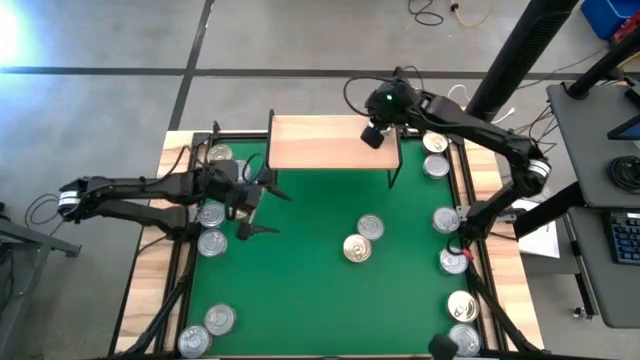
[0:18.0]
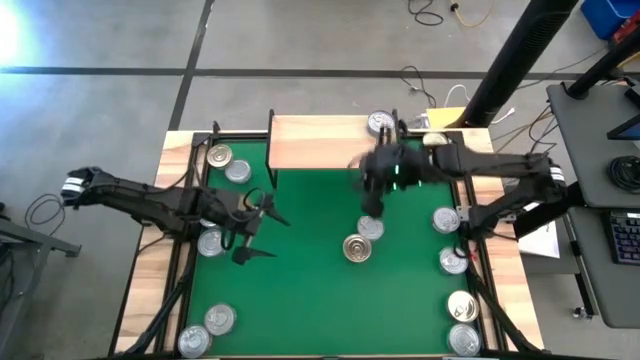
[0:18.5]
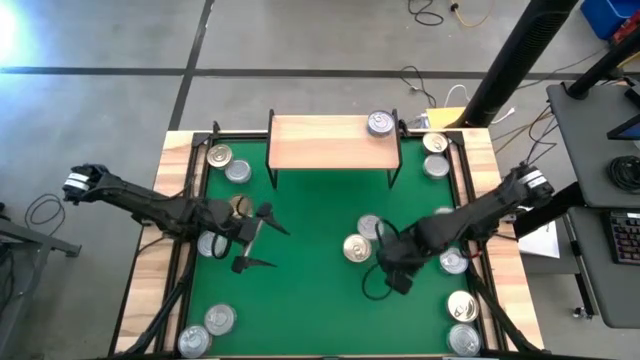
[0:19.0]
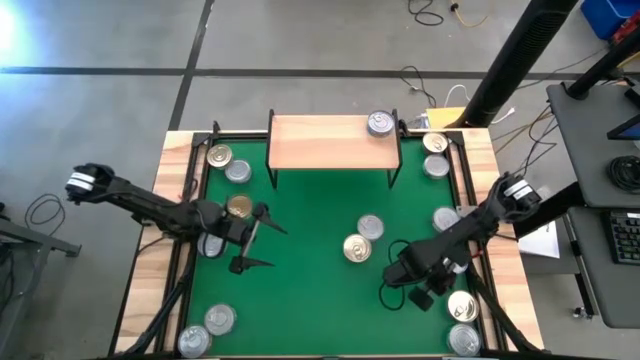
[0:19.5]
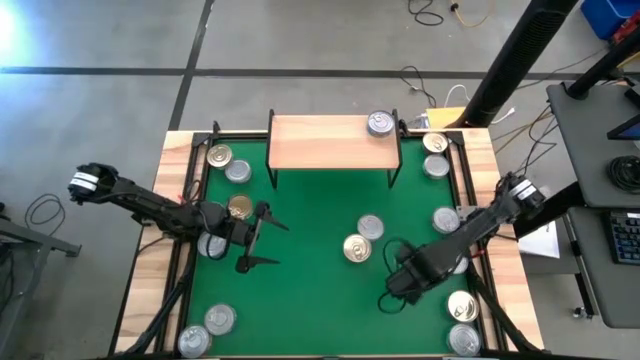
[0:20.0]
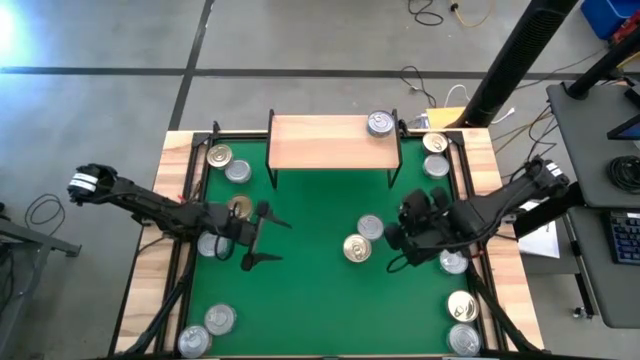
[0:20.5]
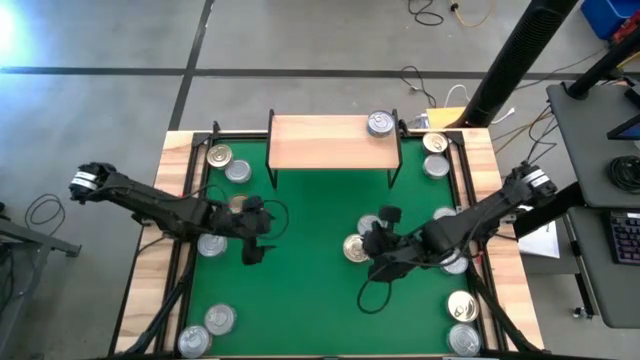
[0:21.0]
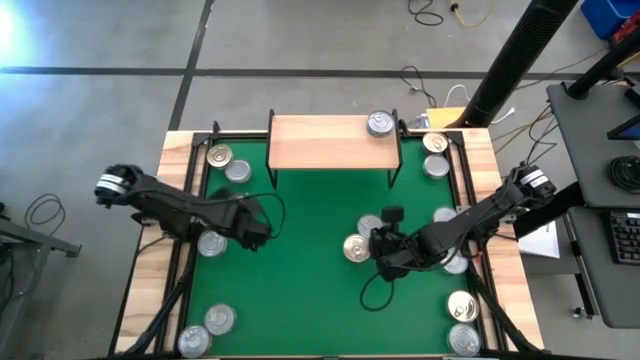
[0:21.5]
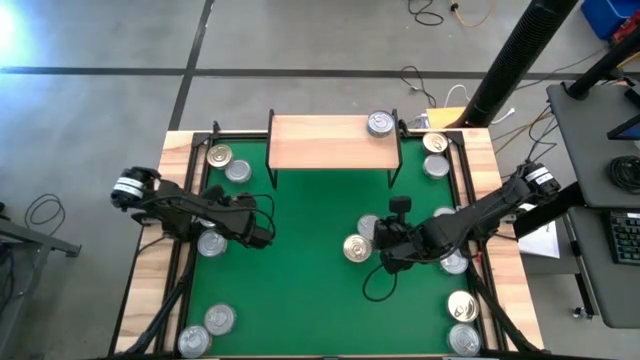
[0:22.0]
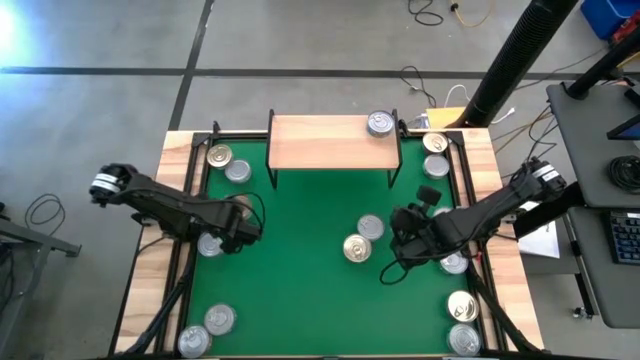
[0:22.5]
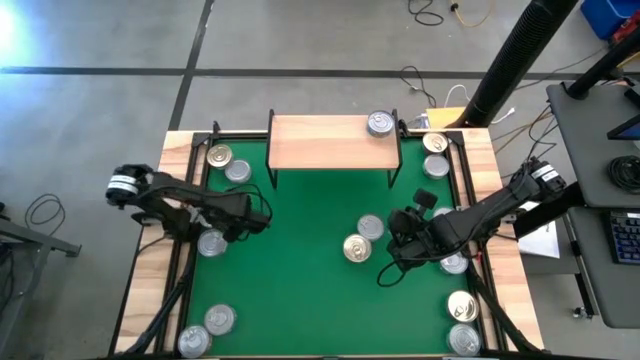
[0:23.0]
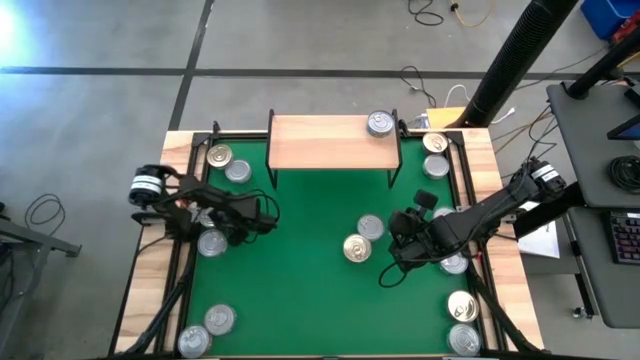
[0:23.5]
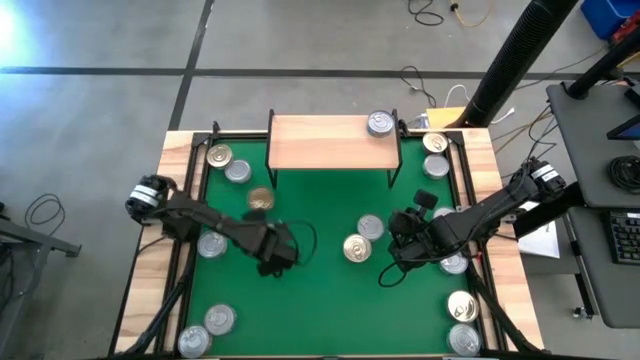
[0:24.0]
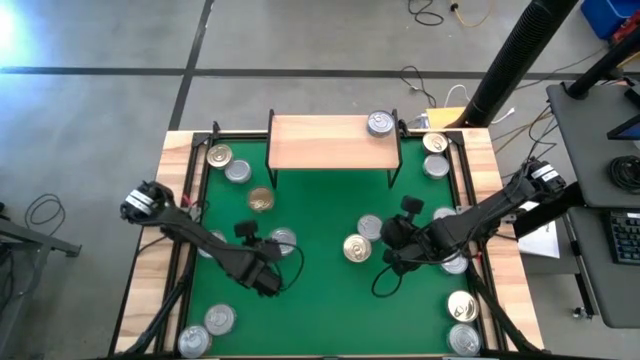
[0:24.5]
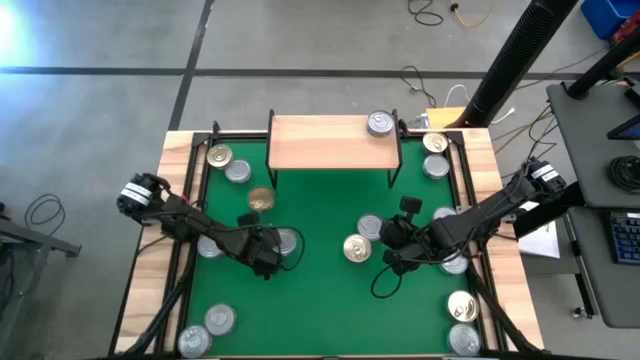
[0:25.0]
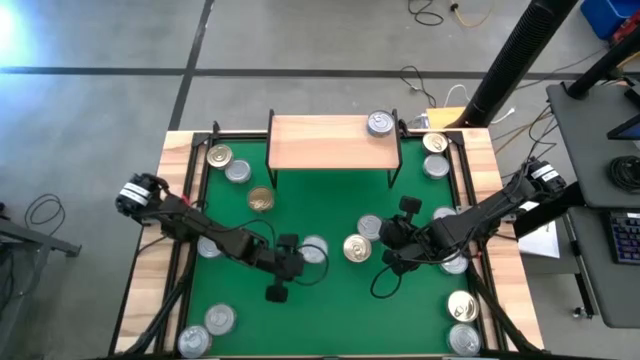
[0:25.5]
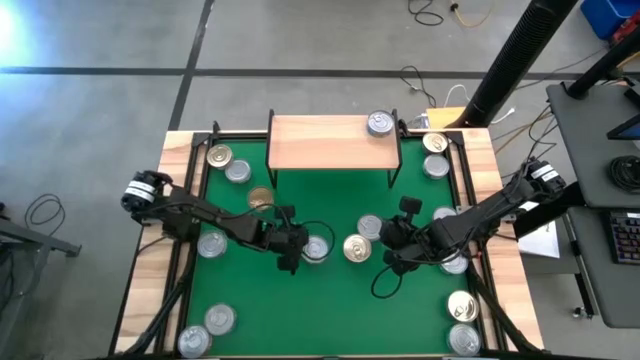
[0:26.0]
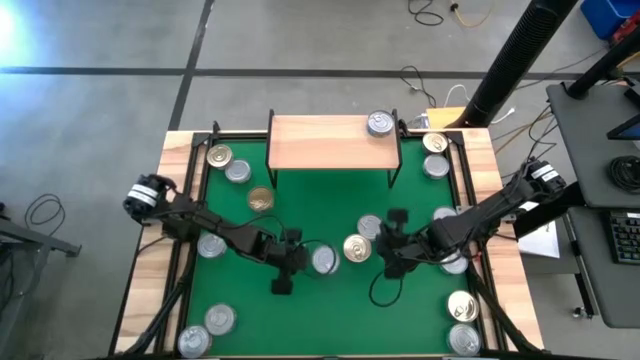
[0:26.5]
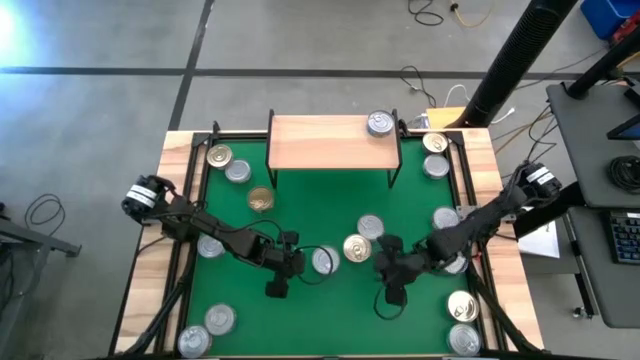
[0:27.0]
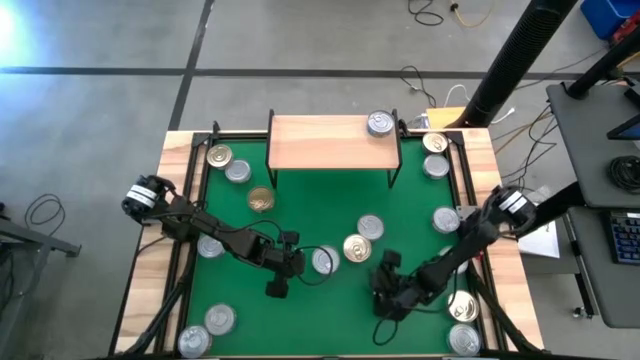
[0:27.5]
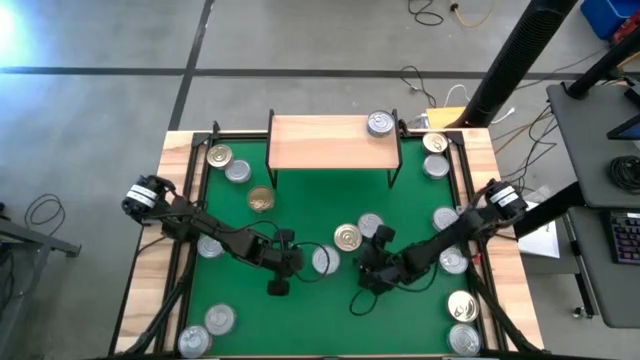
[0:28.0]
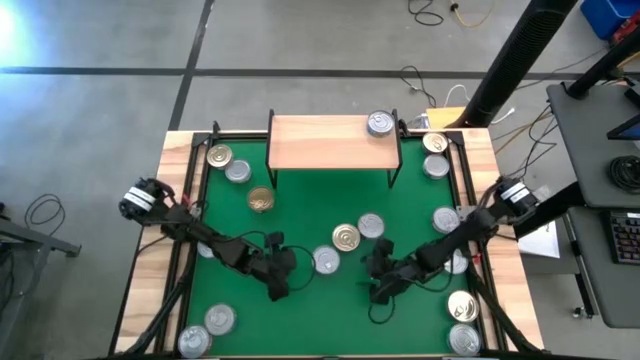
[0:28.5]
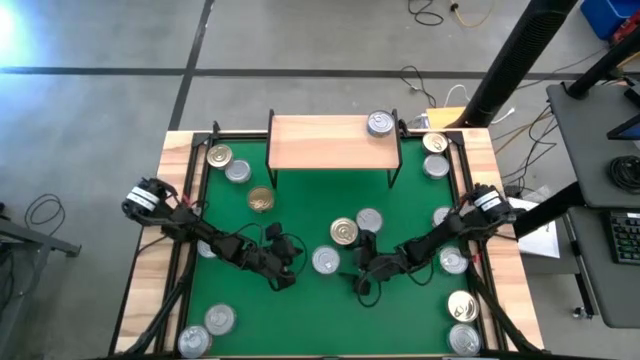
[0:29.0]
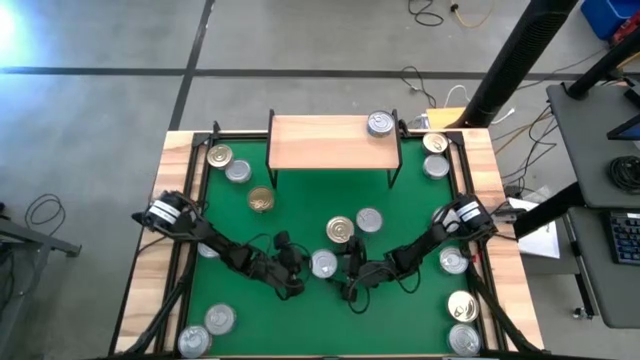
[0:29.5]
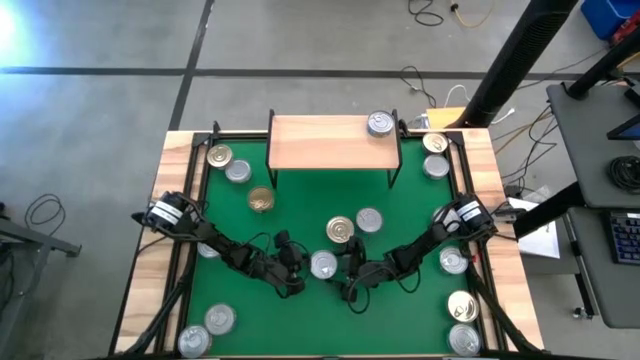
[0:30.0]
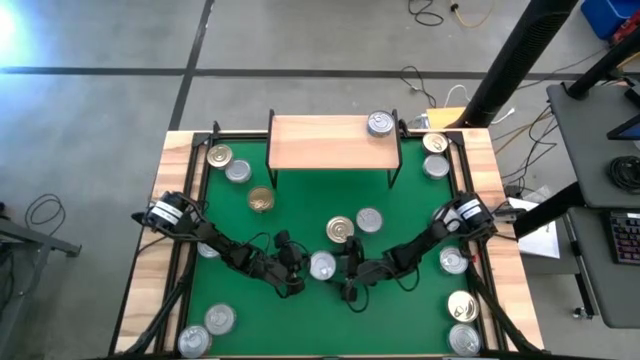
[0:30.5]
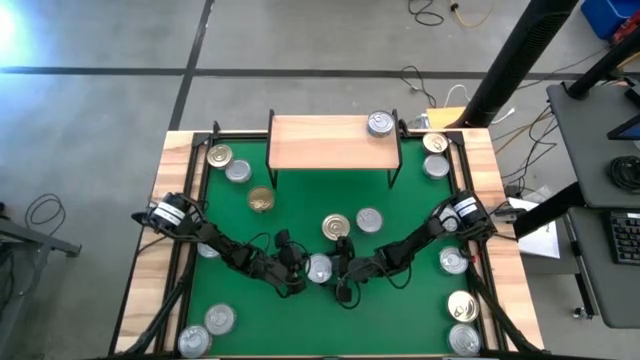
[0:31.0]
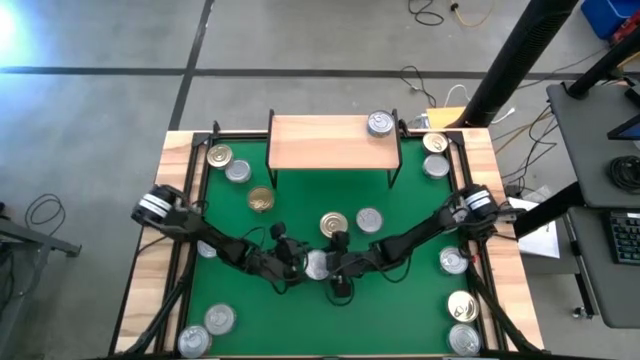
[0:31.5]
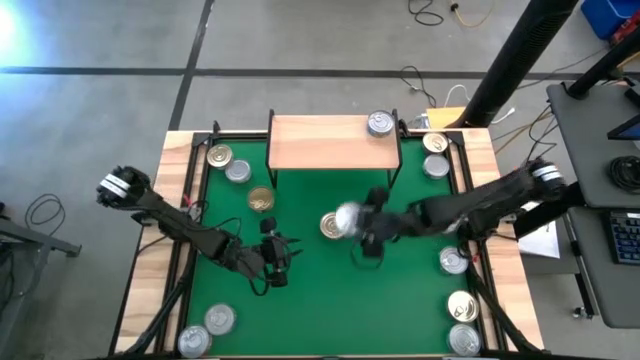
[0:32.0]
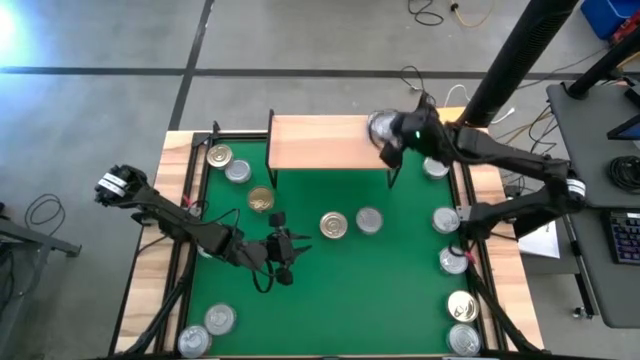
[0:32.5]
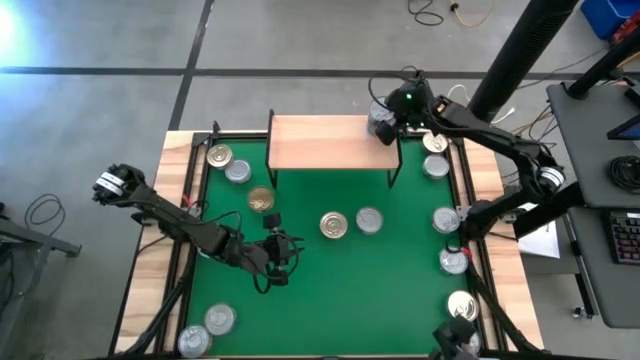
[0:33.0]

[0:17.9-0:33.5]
Task: Stack canned seafood by type on shelf
Stack the green blue tuna can on top of the green blue tuna can on the shelf

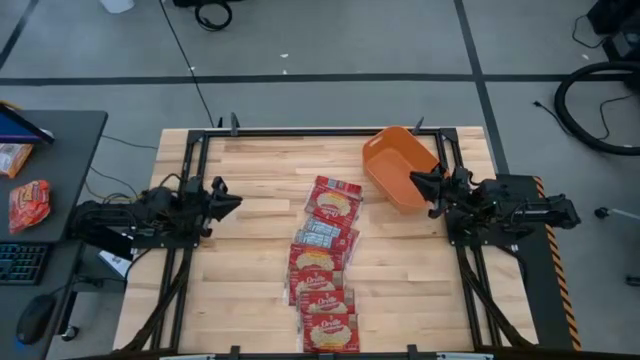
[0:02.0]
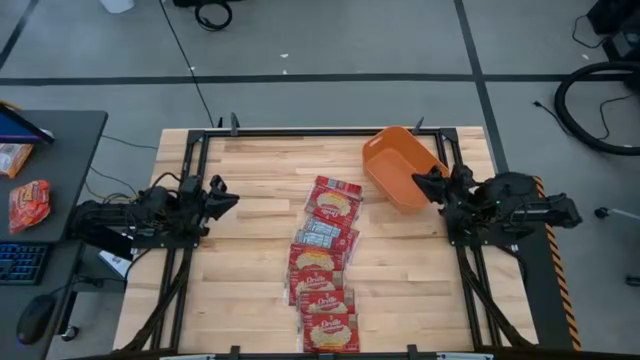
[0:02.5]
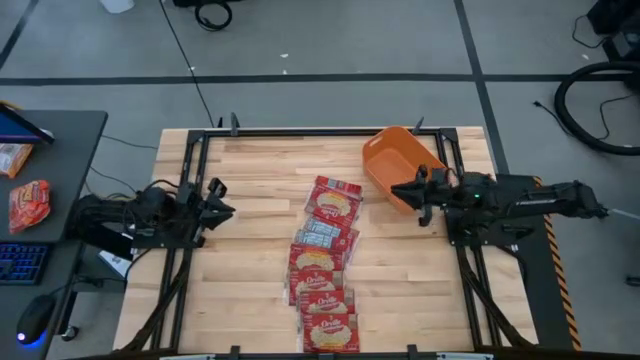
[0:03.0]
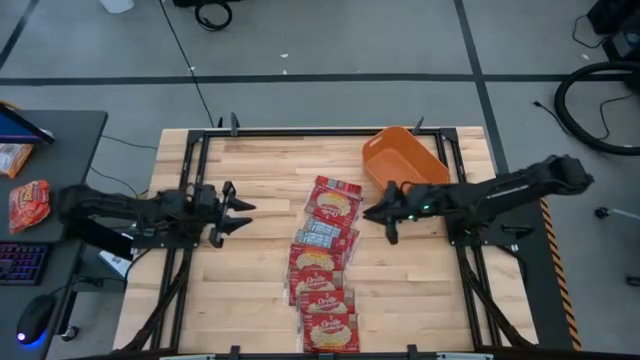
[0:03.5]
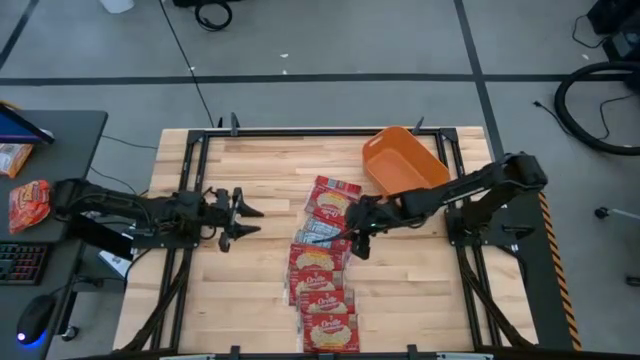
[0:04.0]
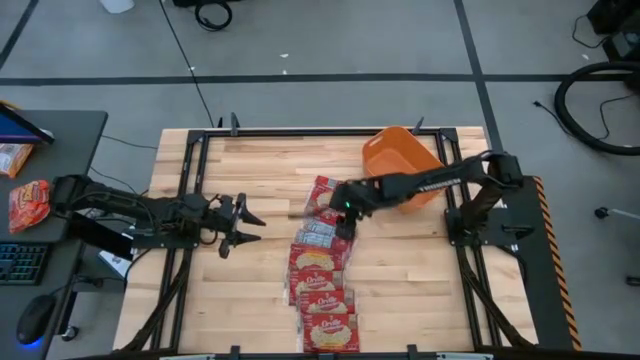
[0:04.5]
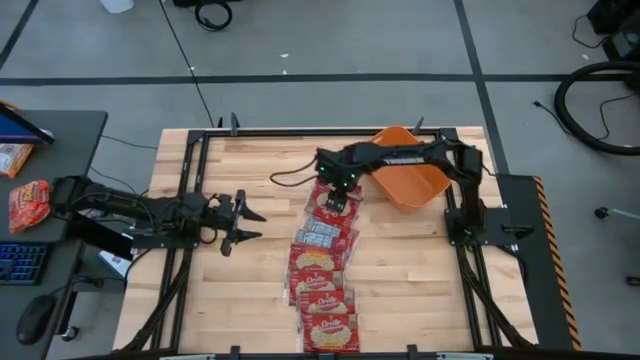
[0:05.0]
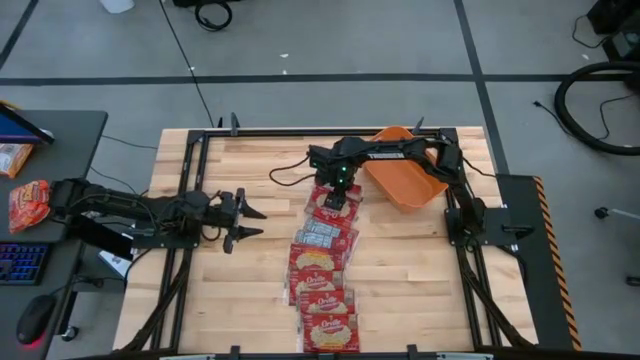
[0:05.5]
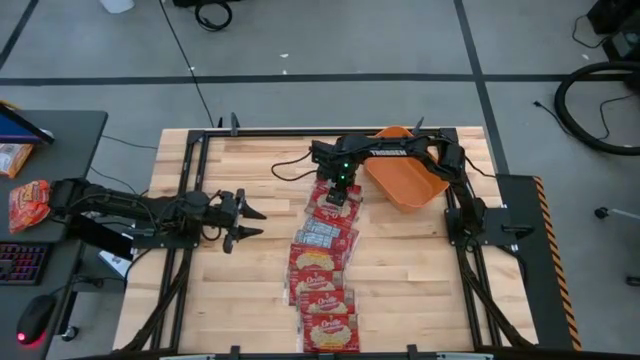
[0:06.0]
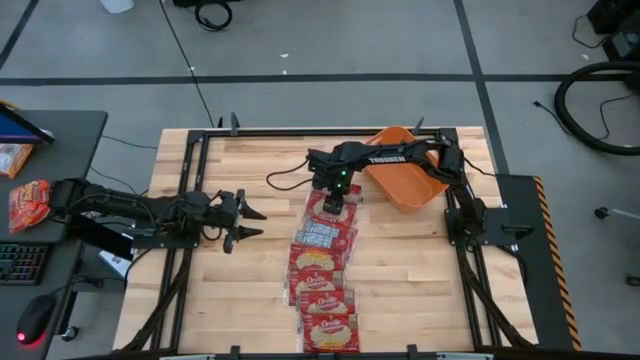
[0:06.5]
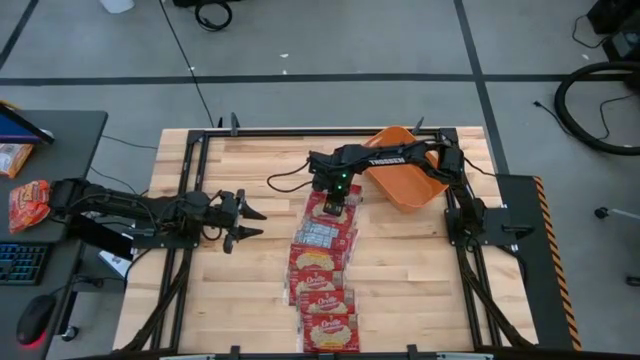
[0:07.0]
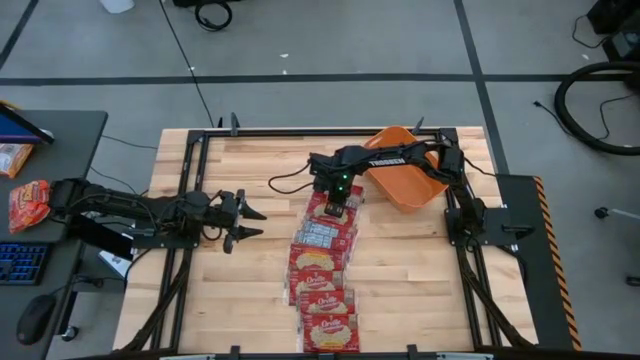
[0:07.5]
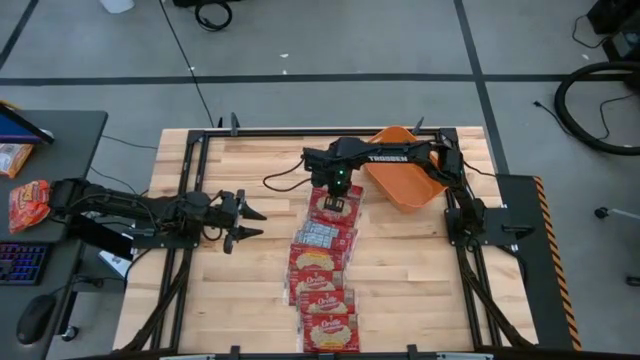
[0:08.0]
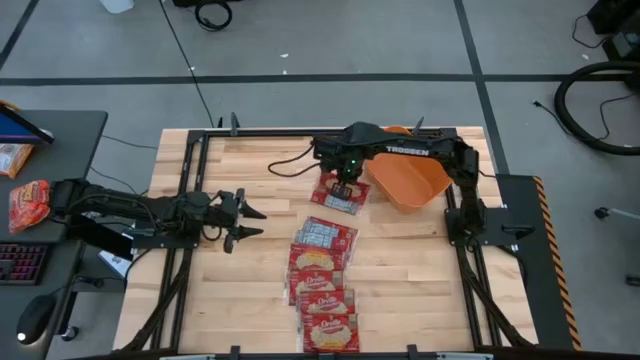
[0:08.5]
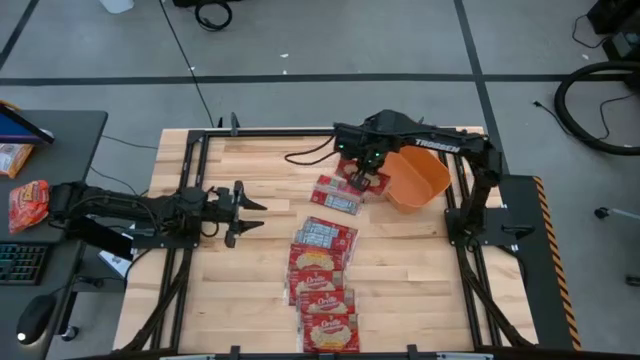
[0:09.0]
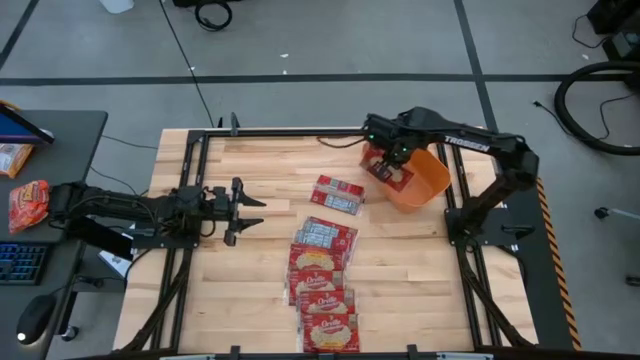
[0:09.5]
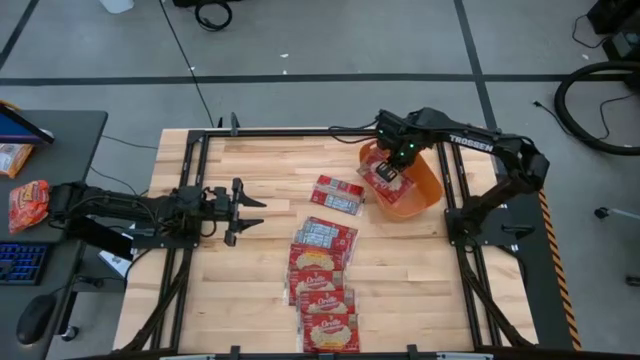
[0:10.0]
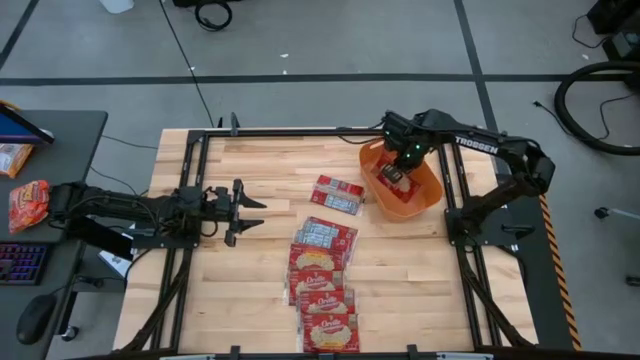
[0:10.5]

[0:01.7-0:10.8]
Task: Sort popcorn bags into baskets
Put the red popcorn bag into the orange bin
